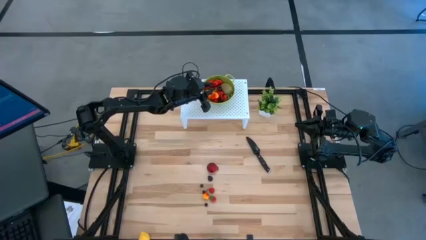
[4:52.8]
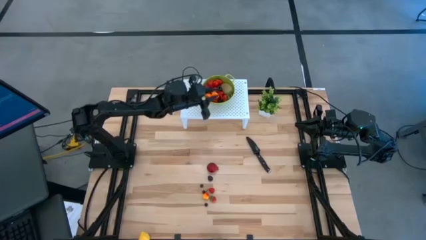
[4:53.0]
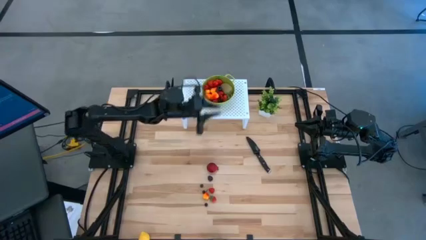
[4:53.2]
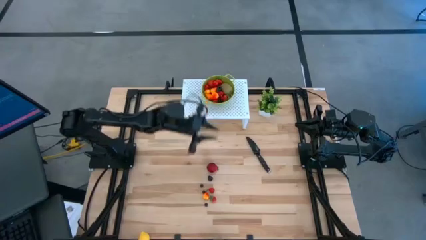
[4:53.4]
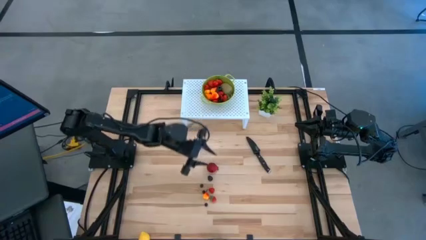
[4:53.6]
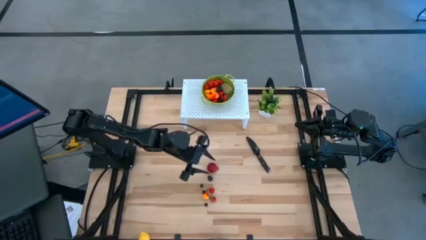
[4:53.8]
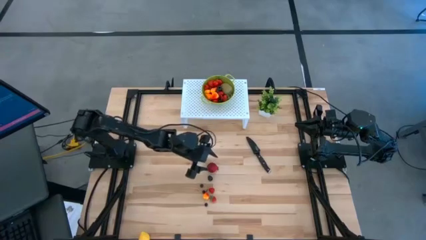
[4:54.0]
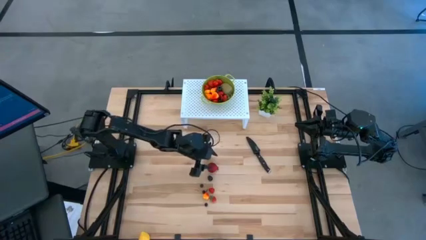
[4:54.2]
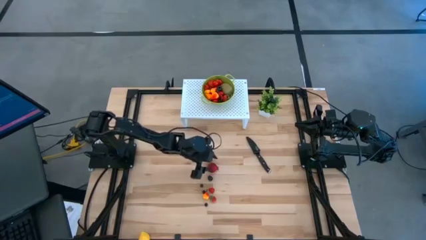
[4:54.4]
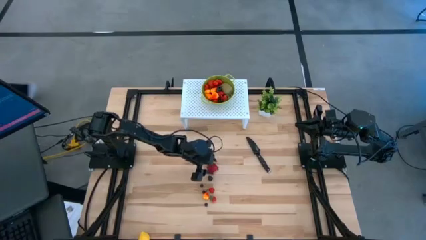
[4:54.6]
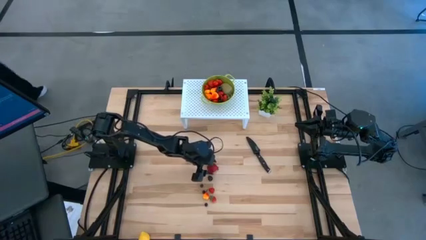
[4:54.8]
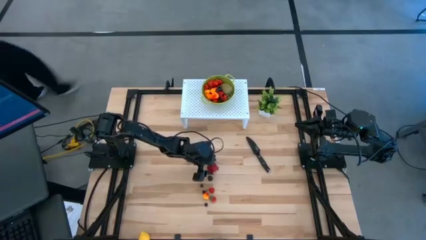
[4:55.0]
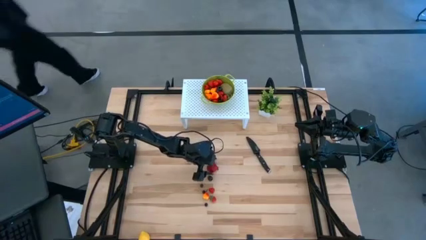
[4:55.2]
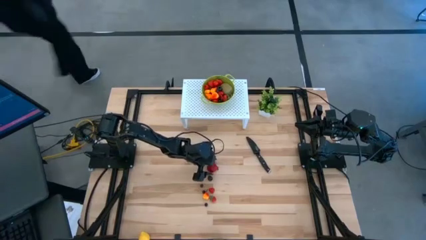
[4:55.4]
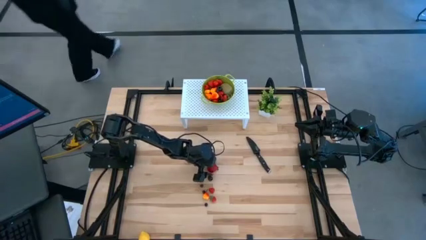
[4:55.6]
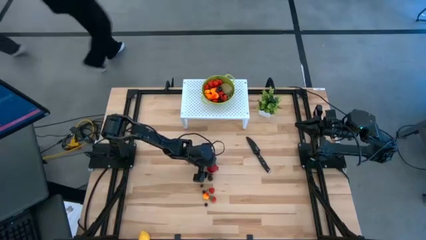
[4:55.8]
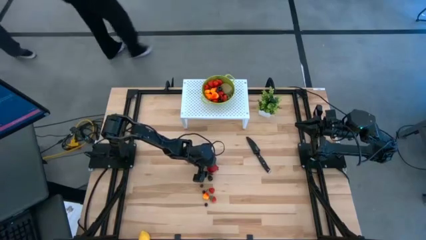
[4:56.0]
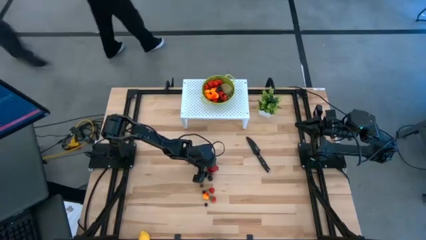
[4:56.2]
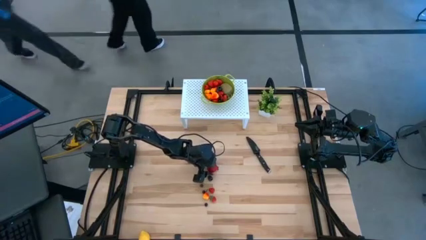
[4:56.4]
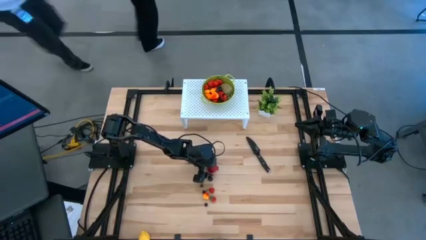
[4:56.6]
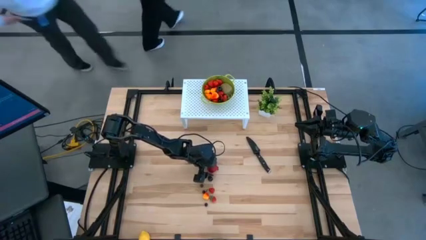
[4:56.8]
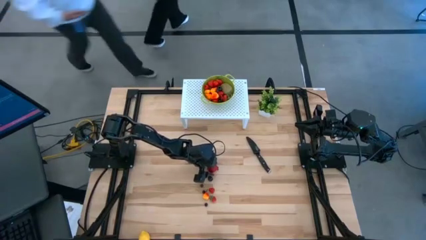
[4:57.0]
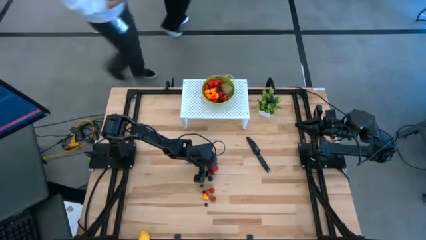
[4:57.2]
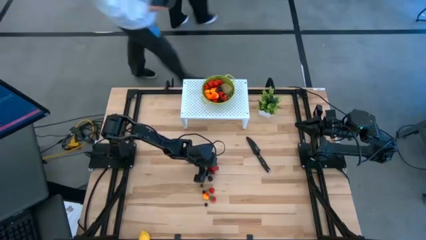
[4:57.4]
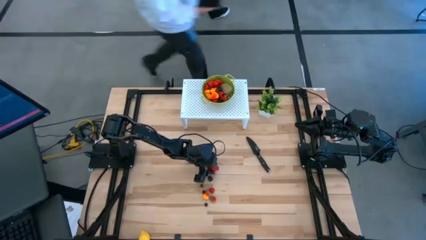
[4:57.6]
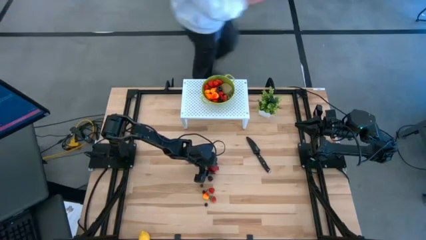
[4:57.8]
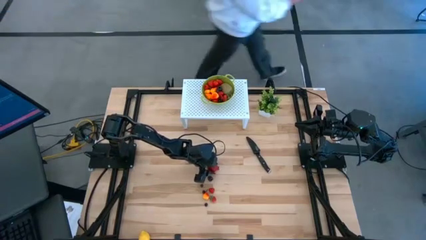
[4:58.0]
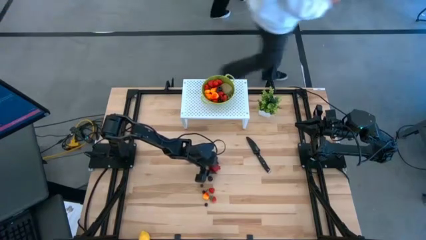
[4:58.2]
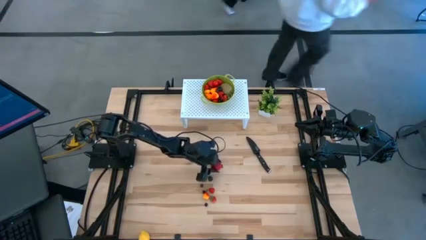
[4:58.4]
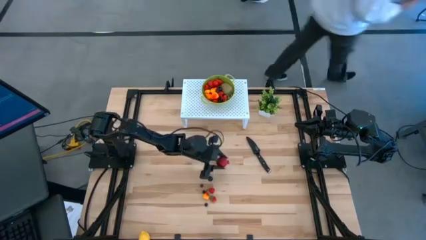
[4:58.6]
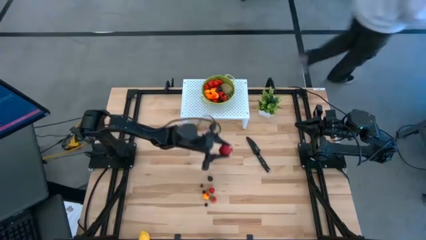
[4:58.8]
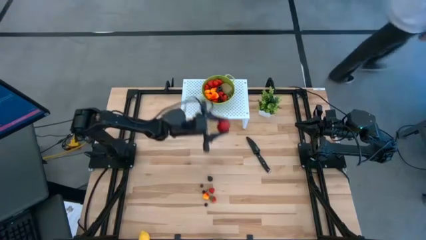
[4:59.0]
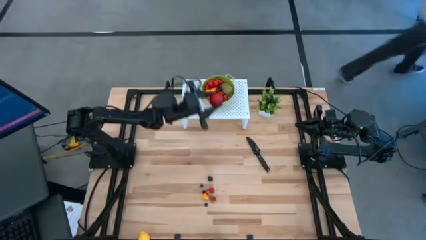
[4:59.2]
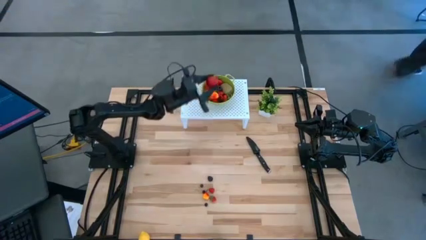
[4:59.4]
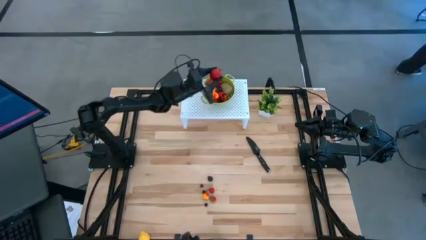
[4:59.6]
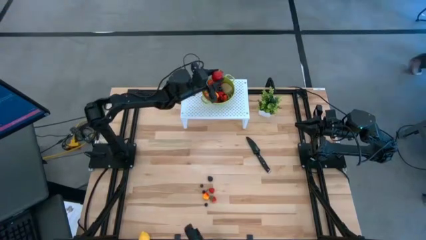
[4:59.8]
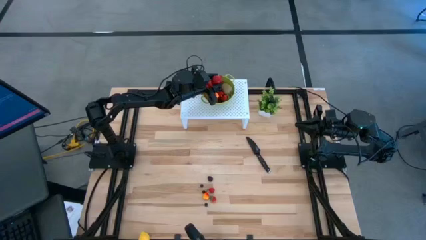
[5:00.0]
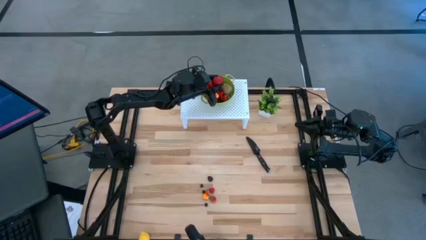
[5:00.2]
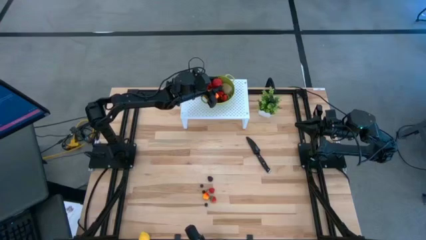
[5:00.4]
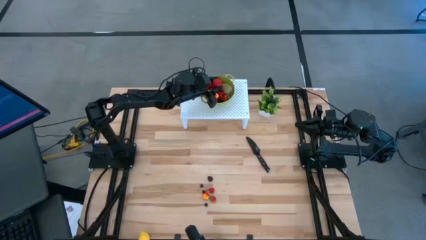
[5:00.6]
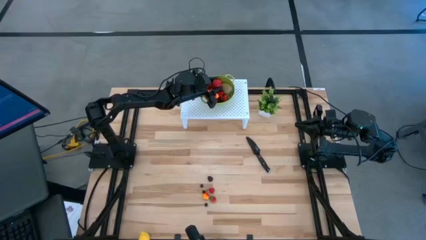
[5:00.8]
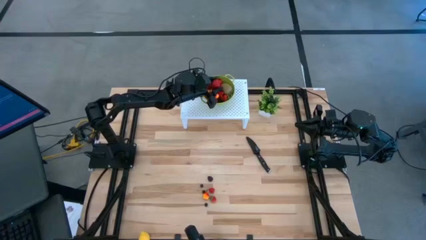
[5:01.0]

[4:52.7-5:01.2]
Task: Pick & Place Fruit
Put the red pomegranate into the green strainer bowl

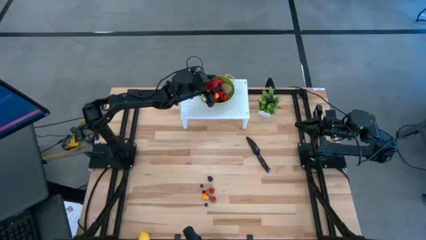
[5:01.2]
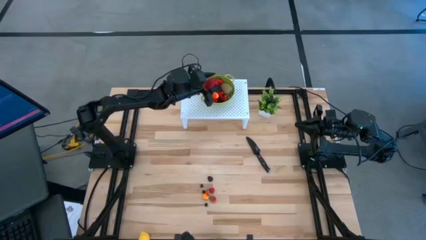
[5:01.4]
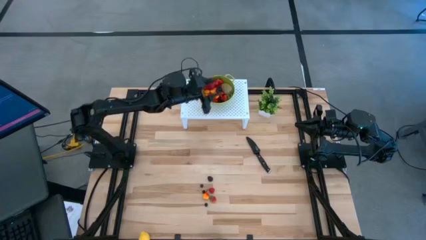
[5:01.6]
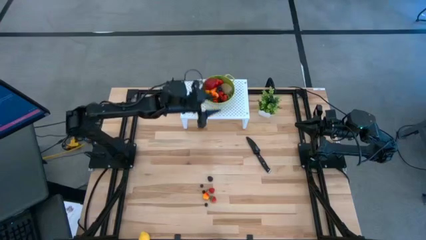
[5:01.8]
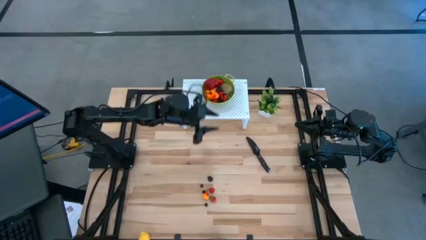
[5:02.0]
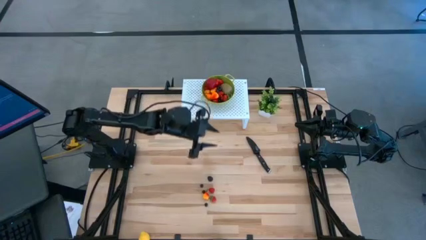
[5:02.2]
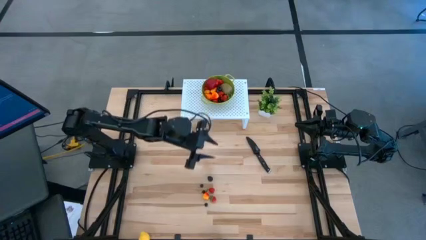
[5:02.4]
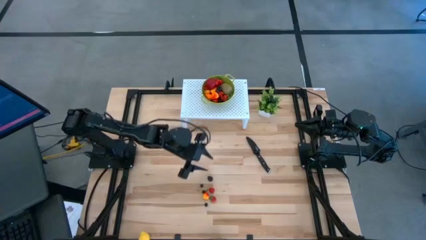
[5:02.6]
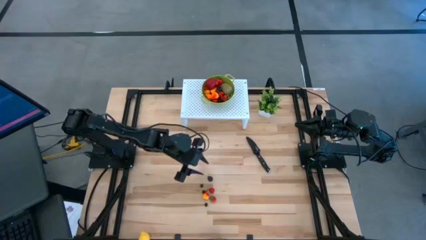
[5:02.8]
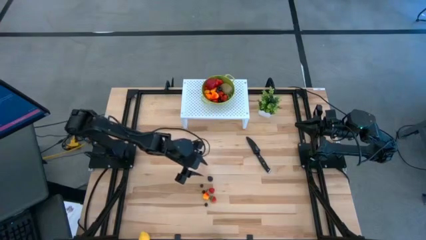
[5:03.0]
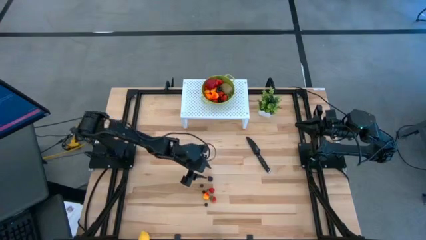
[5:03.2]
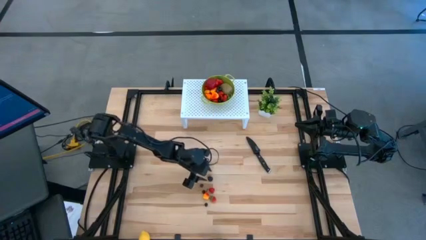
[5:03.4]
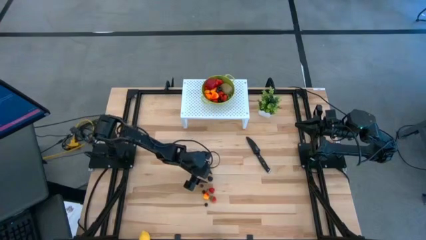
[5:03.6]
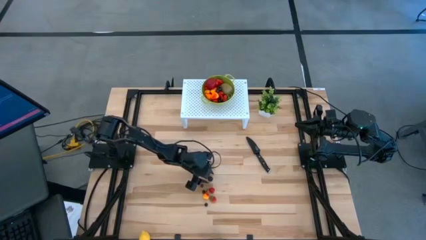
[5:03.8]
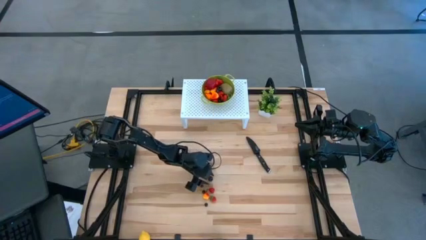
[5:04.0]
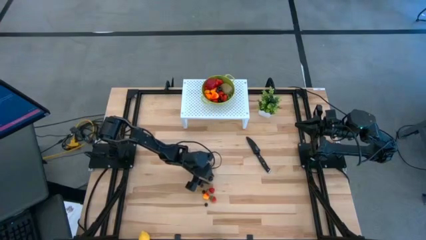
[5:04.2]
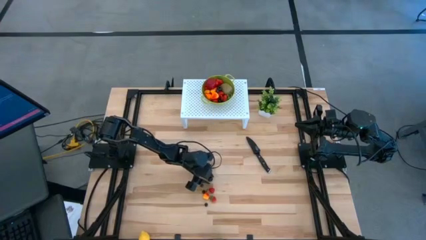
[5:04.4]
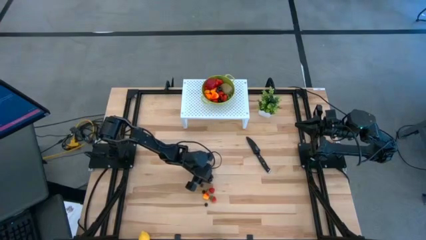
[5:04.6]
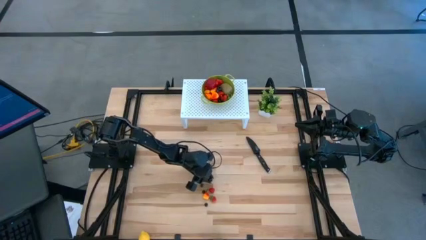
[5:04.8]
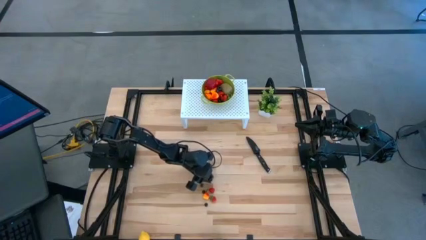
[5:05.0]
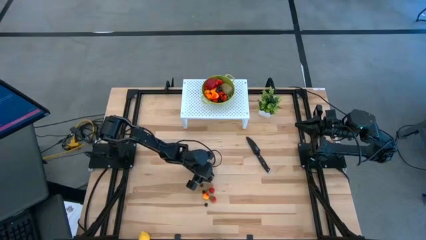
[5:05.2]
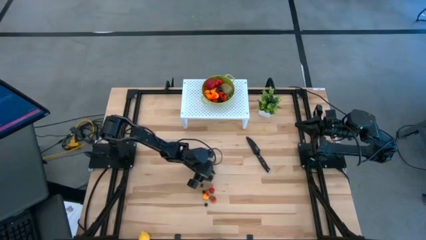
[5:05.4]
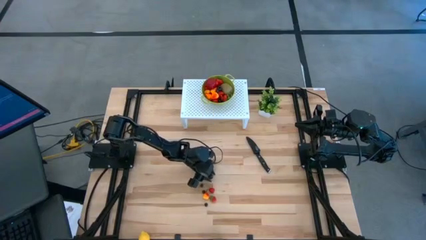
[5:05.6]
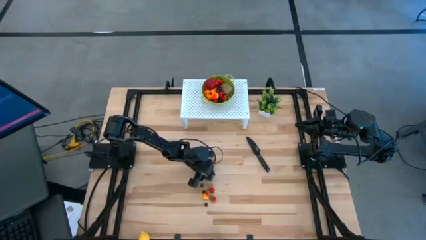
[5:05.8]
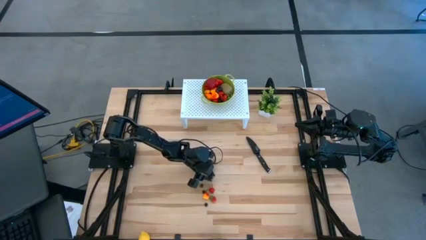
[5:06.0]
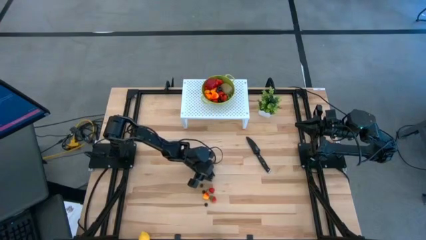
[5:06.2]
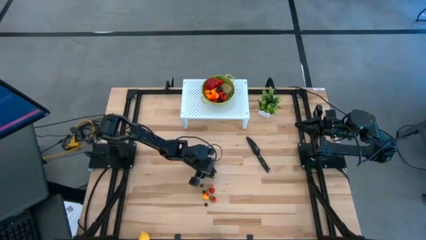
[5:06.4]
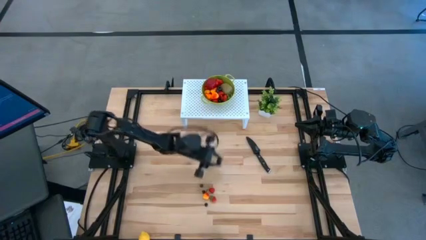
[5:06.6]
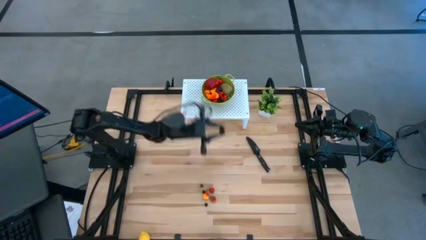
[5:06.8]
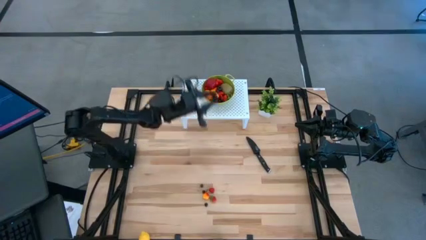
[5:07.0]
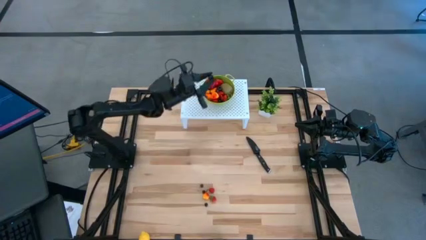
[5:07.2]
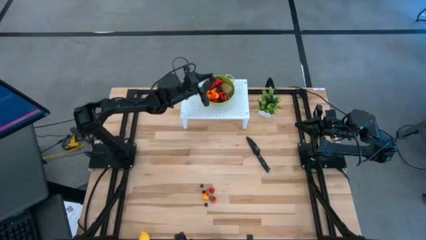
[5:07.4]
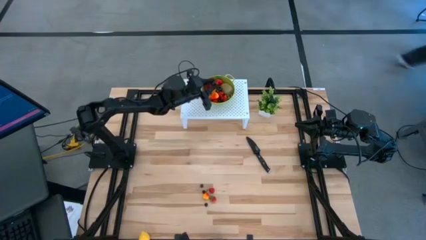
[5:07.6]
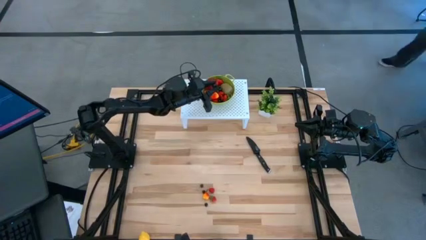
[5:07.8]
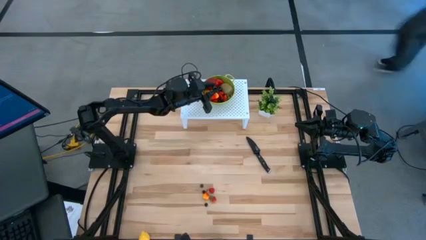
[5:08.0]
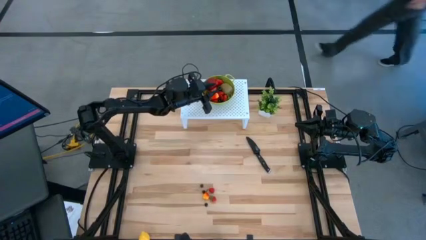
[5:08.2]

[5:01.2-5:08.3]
Put the black raspberry into the green strainer bowl

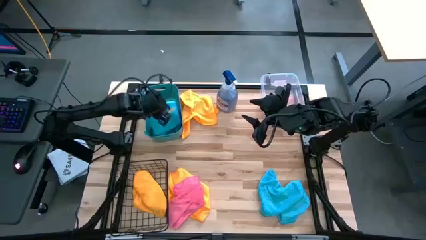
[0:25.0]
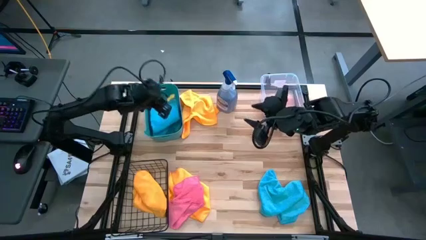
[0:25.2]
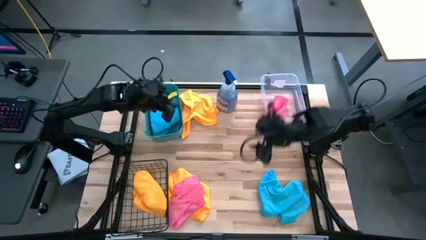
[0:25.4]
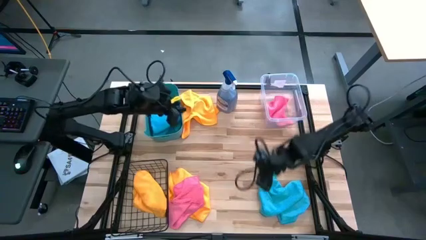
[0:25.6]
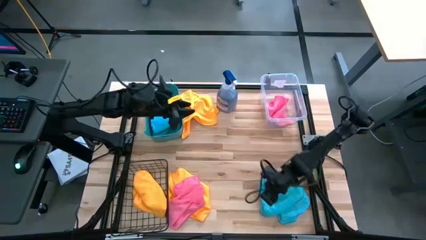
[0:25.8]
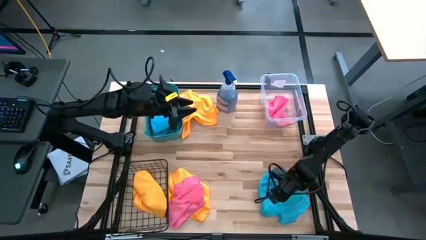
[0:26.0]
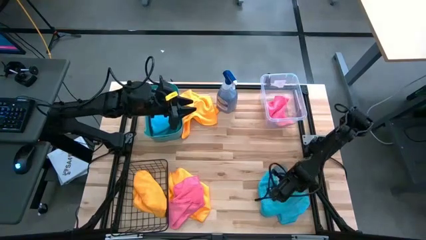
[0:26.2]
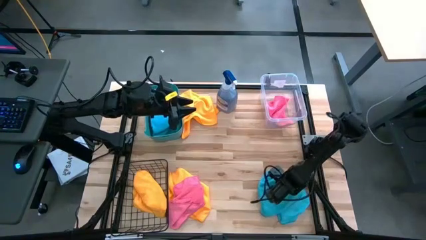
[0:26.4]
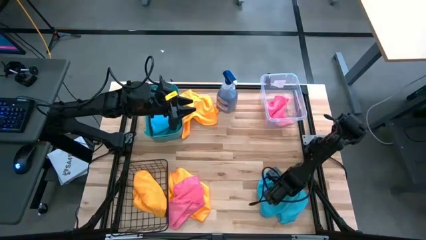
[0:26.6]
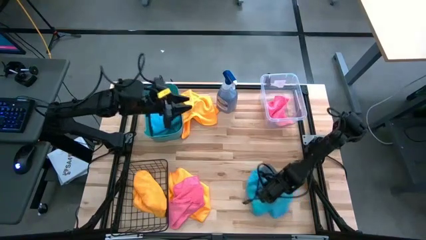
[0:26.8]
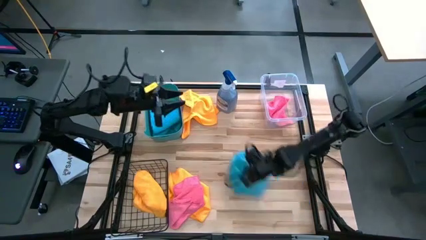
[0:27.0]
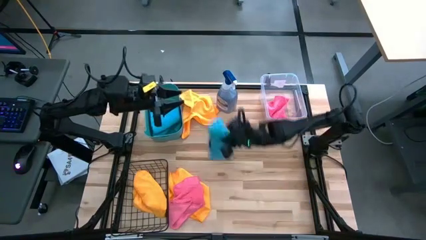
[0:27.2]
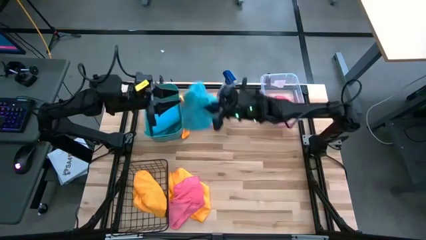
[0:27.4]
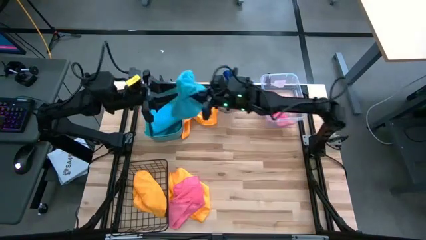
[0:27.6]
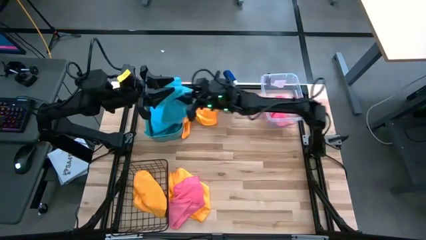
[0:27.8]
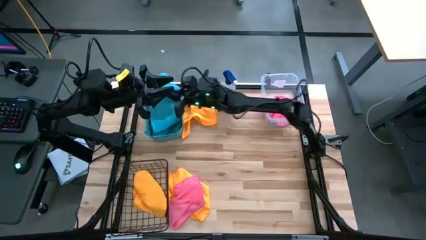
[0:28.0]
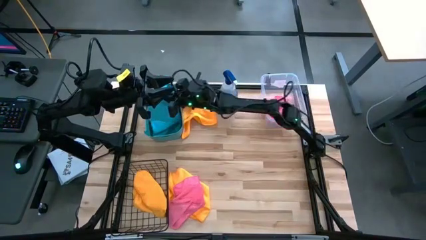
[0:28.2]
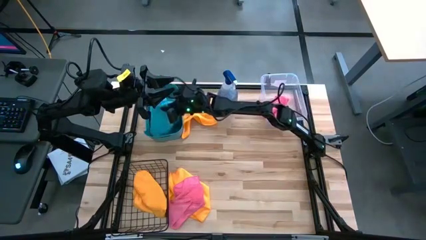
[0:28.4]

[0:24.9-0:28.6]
Task: Sort microfiber towel by color & place in baskets
Put the blue towel in the green bin
